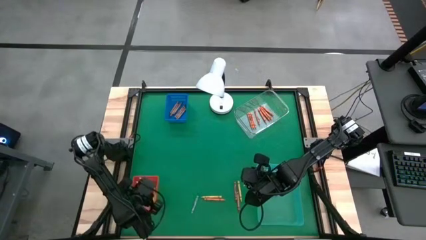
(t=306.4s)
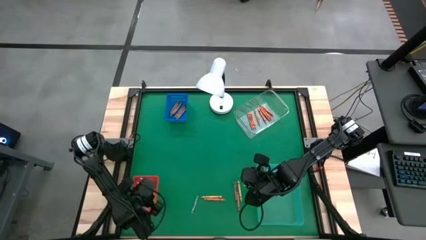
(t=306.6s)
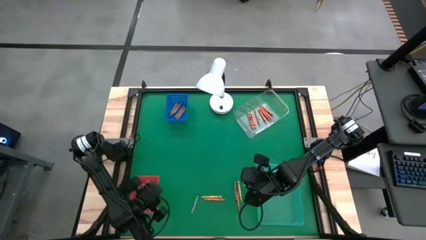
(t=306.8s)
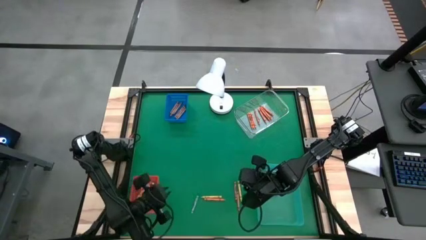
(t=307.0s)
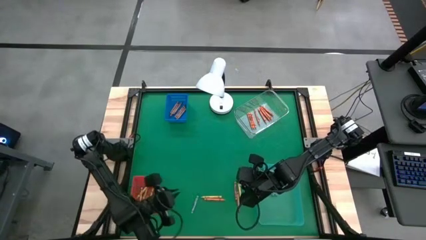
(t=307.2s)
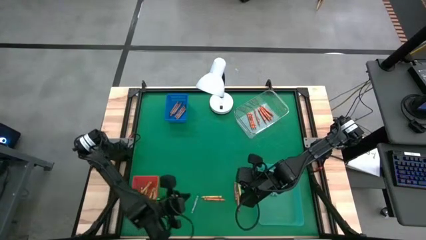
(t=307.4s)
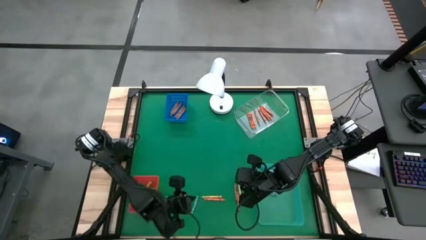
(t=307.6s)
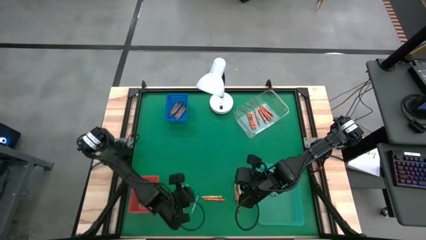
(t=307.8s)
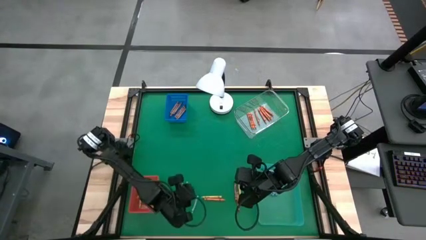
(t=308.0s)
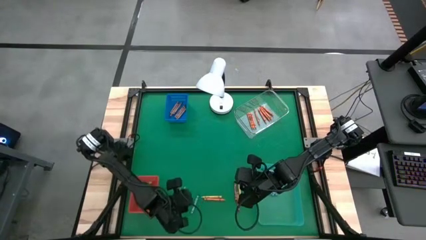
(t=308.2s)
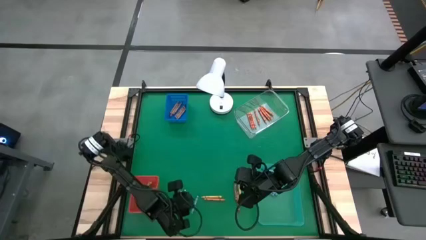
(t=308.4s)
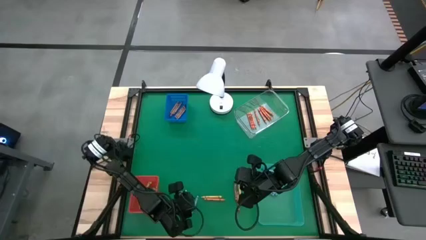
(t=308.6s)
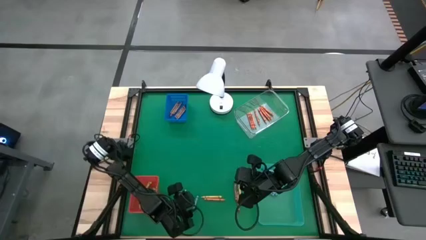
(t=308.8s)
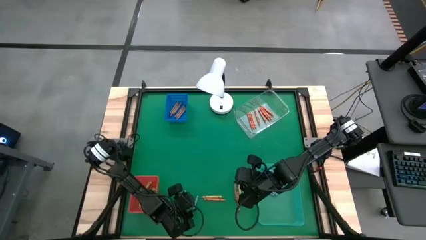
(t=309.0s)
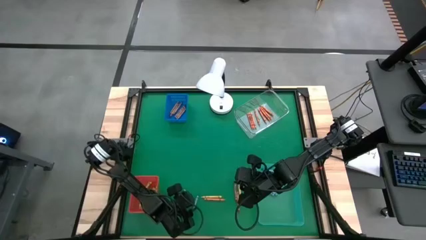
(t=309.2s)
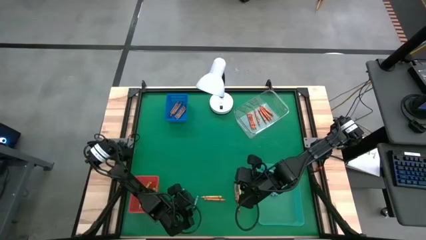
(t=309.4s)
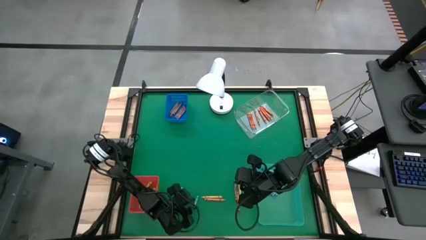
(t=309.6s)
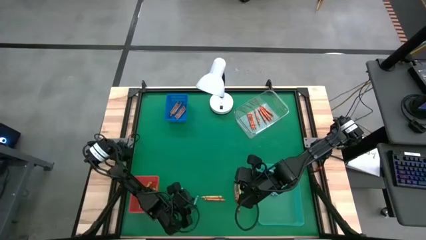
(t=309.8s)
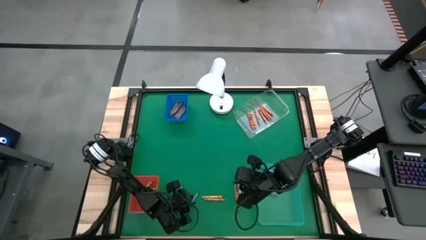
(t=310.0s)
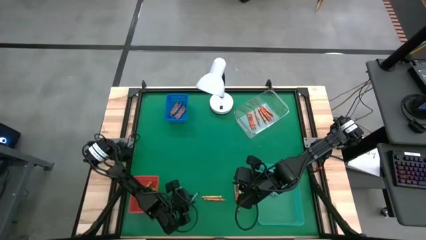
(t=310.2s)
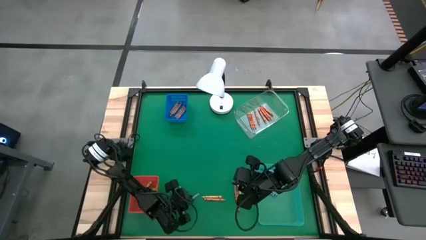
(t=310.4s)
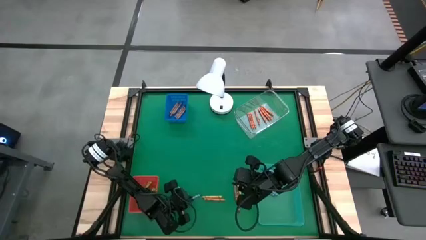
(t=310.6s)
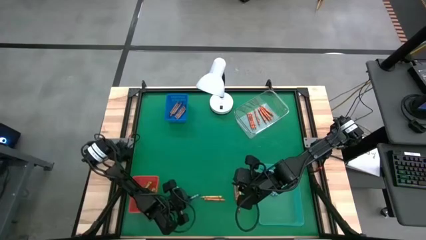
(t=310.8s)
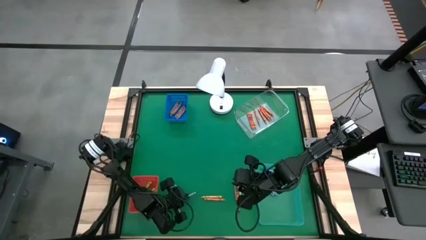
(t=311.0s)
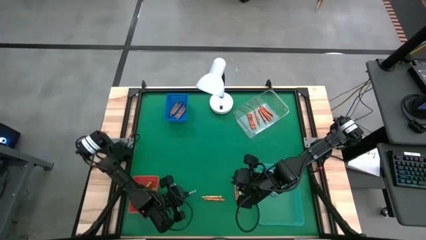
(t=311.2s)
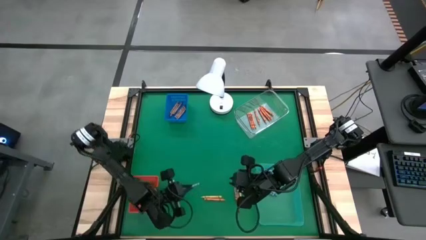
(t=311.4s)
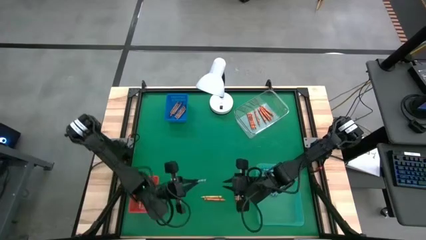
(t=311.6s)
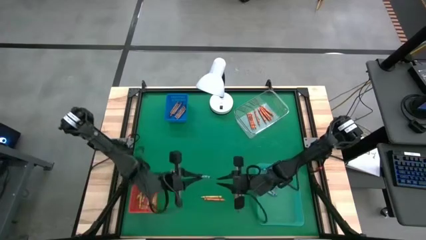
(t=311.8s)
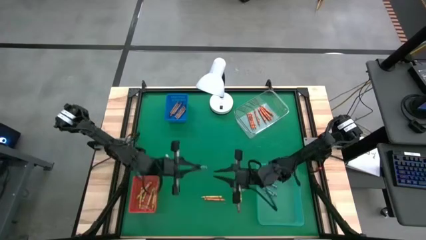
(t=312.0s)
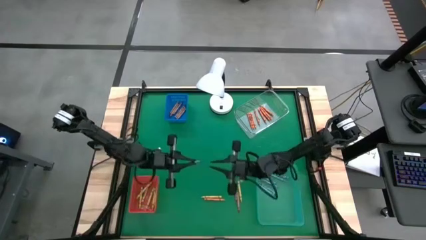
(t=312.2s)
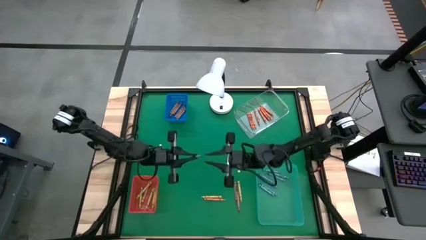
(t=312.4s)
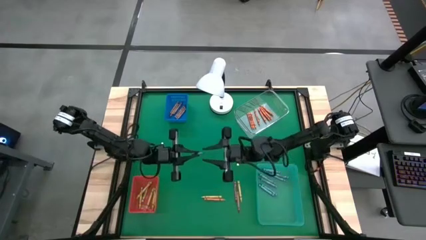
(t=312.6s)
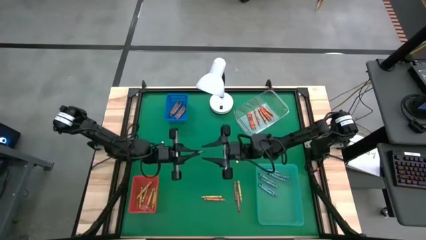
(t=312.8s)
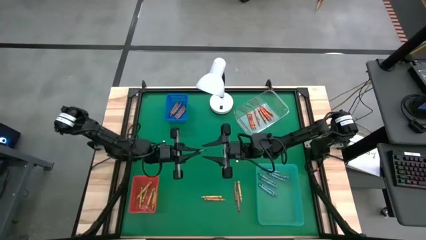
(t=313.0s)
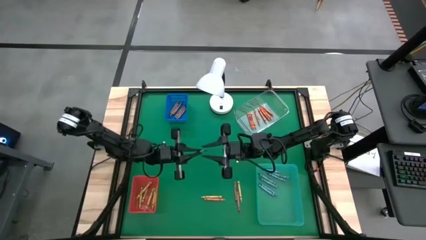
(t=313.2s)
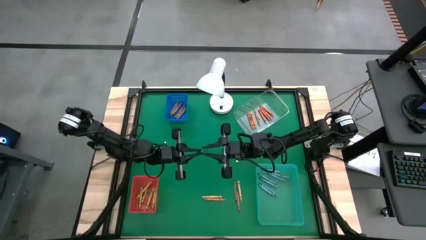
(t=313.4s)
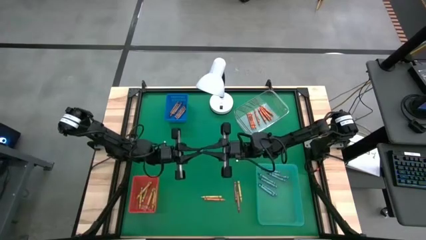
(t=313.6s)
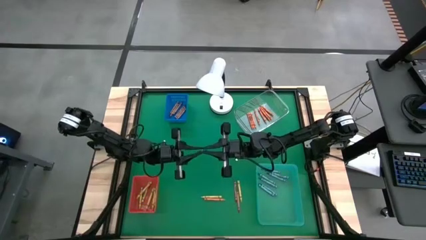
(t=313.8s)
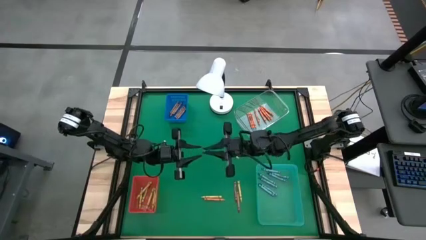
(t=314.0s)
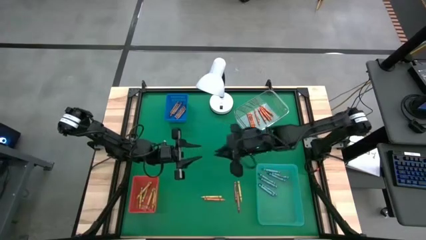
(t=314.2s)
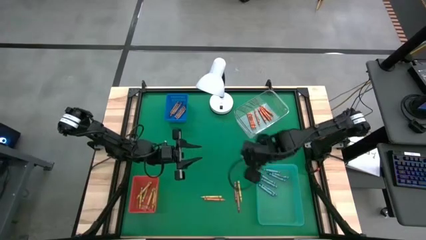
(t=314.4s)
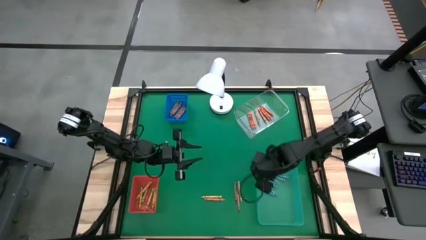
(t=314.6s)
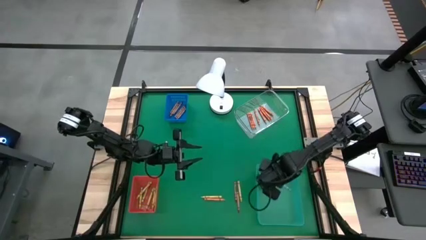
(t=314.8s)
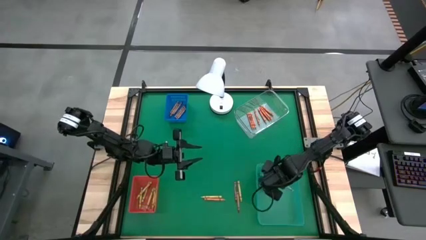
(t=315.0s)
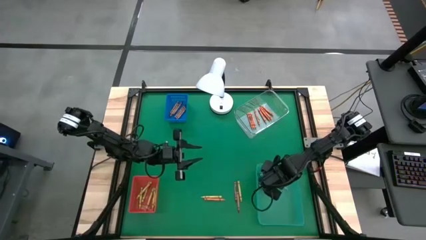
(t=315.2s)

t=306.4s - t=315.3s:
Task: Sort crayons
Put the blue crayon into the green bin

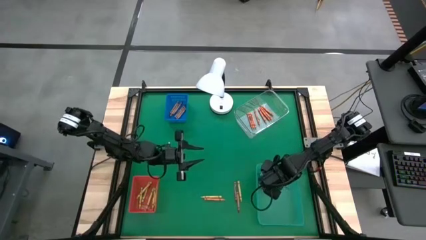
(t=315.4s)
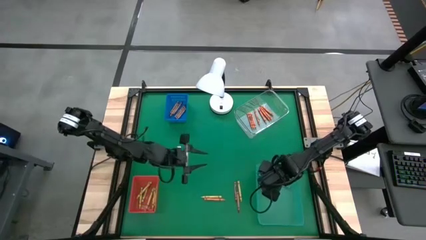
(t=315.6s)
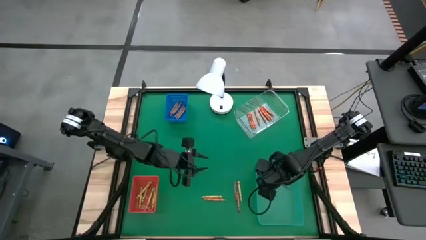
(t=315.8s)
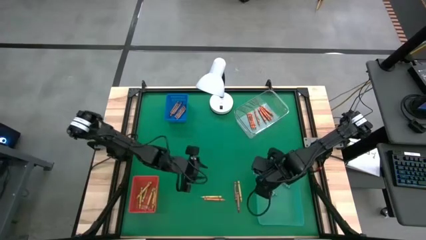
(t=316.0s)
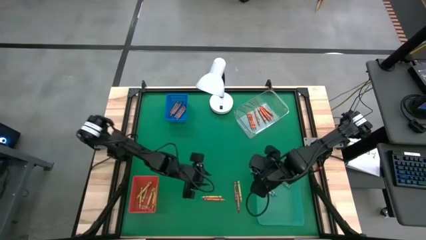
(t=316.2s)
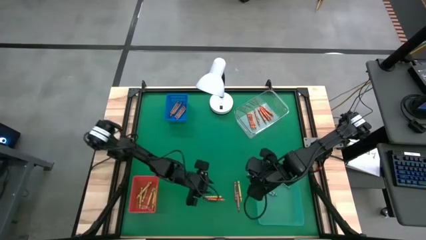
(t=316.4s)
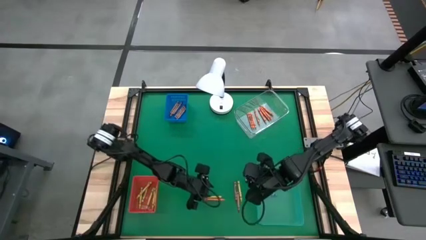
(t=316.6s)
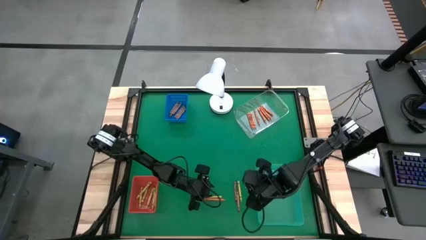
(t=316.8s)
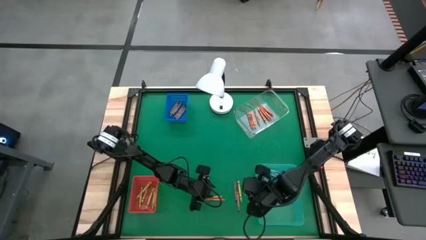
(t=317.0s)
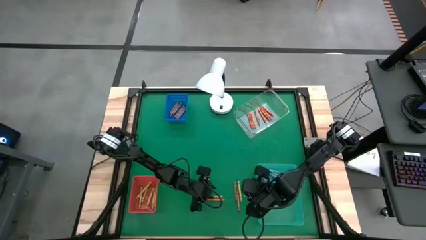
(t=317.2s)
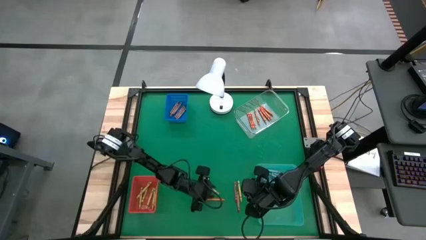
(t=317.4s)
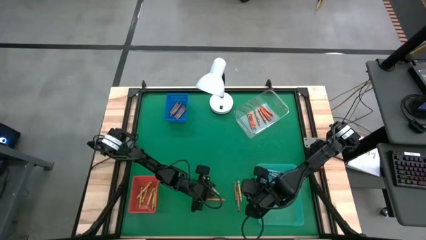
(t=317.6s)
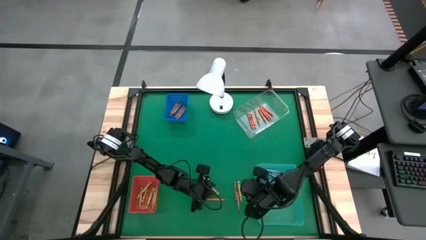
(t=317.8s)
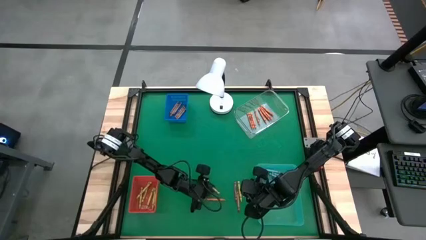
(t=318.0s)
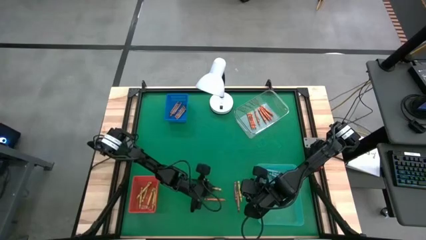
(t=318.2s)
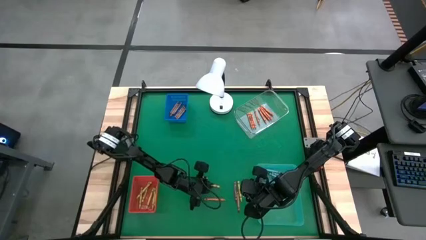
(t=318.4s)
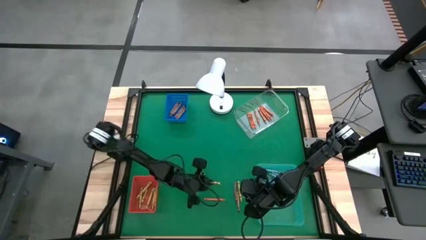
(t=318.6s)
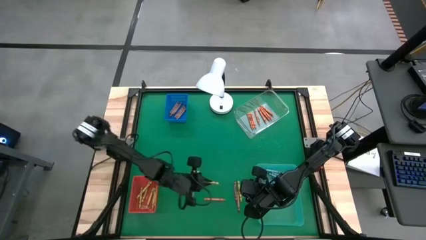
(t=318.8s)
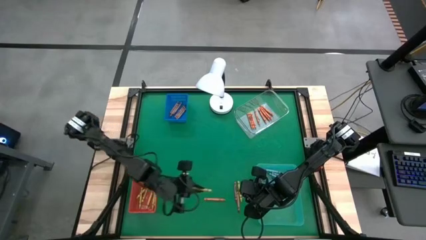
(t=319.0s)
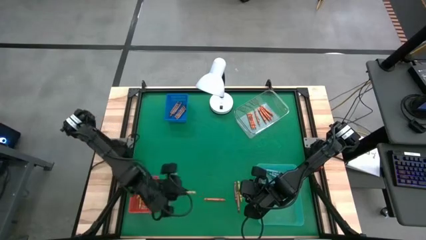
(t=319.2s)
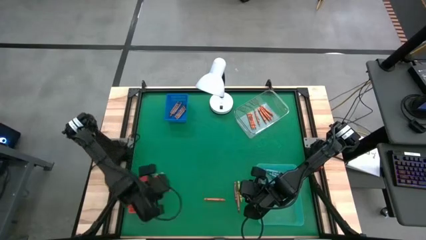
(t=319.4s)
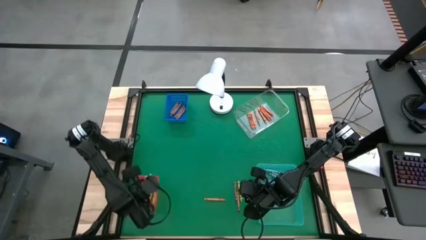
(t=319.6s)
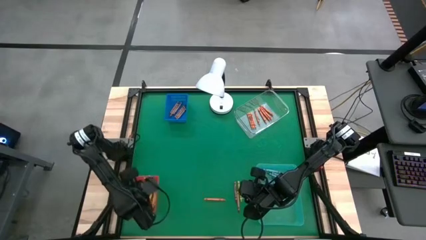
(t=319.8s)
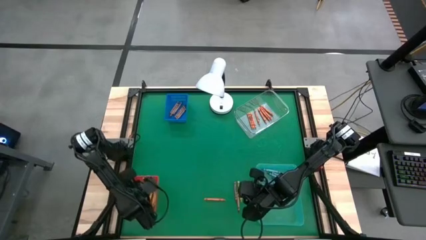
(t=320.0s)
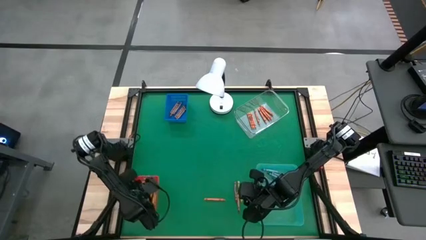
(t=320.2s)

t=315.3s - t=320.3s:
Put the yellow crayon into the red bin
